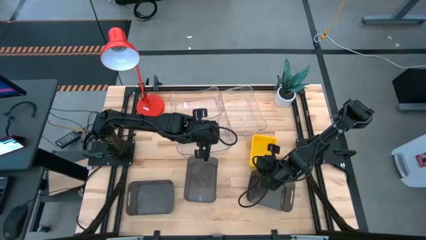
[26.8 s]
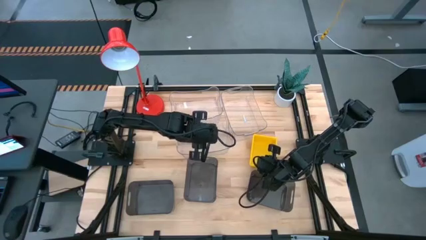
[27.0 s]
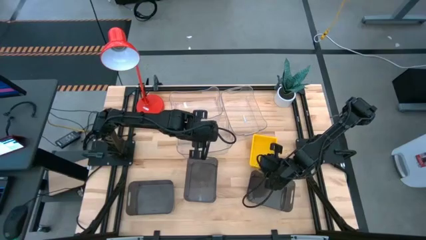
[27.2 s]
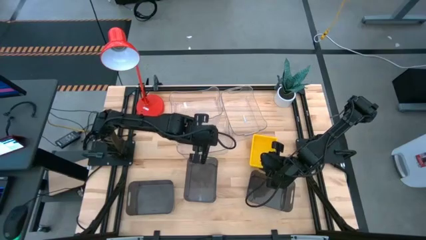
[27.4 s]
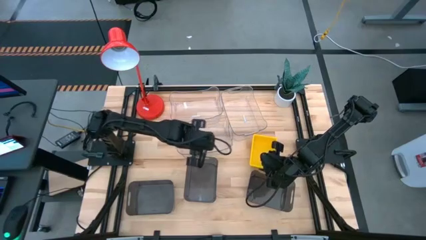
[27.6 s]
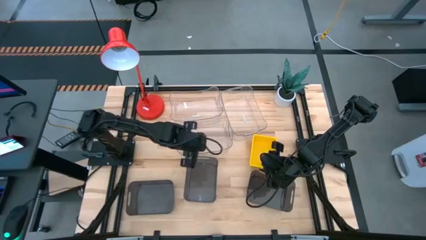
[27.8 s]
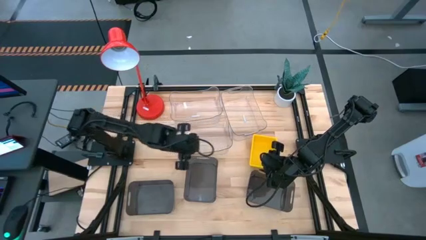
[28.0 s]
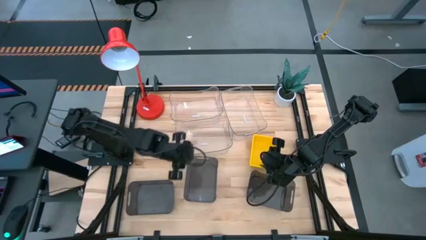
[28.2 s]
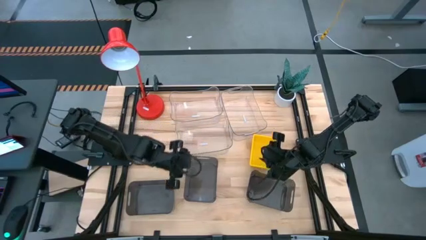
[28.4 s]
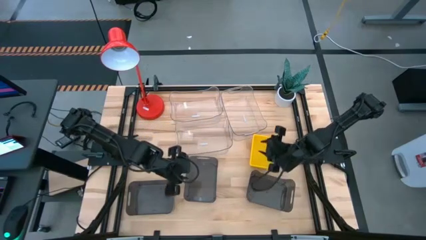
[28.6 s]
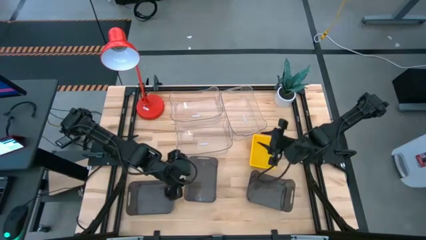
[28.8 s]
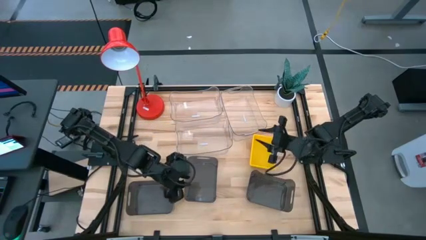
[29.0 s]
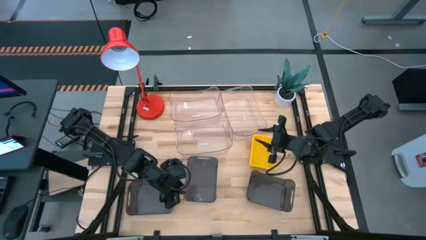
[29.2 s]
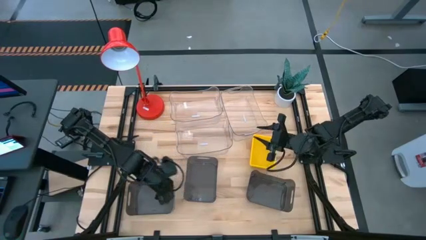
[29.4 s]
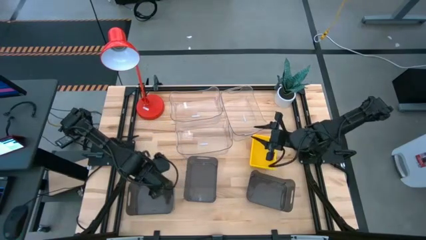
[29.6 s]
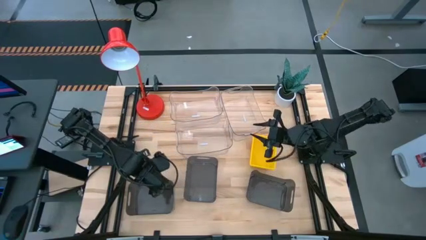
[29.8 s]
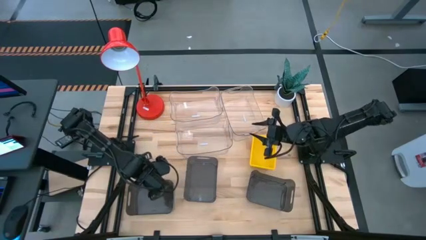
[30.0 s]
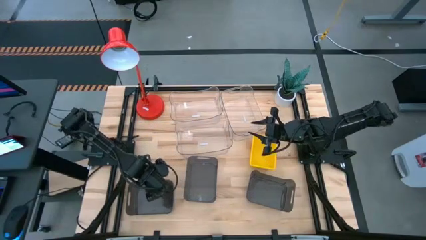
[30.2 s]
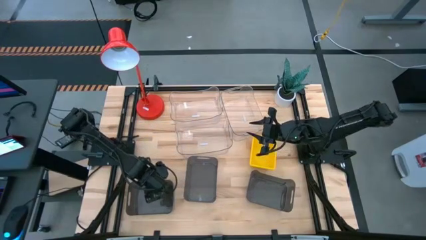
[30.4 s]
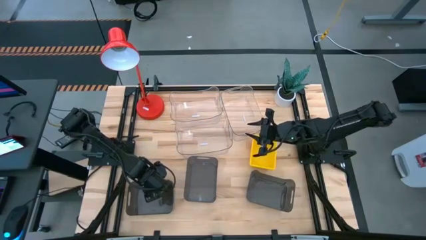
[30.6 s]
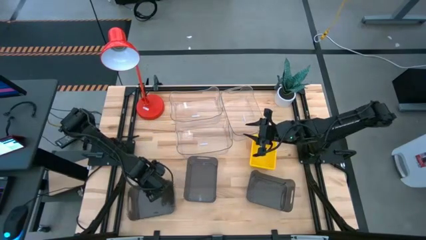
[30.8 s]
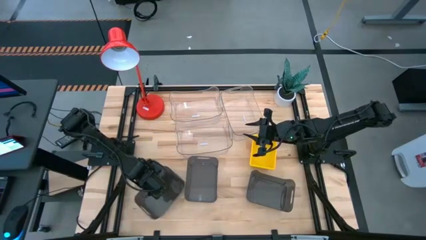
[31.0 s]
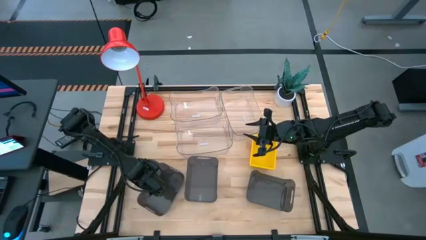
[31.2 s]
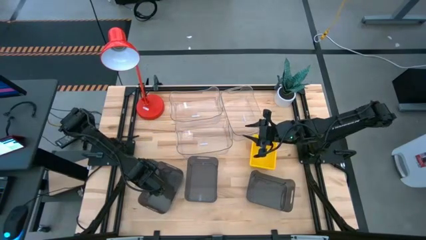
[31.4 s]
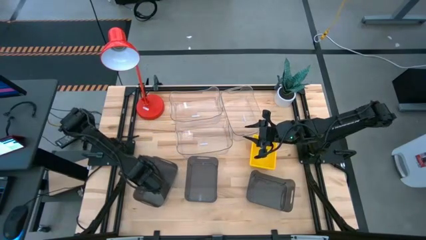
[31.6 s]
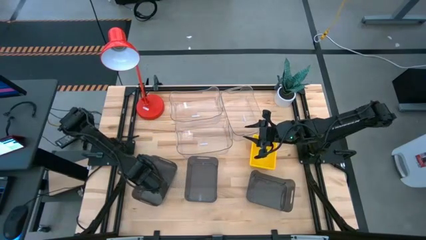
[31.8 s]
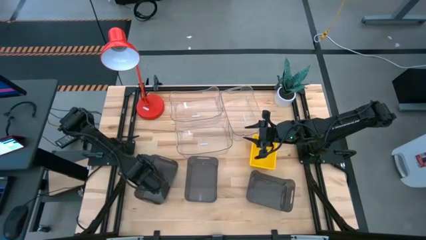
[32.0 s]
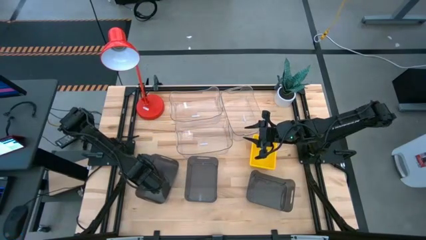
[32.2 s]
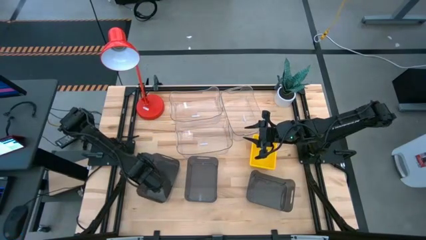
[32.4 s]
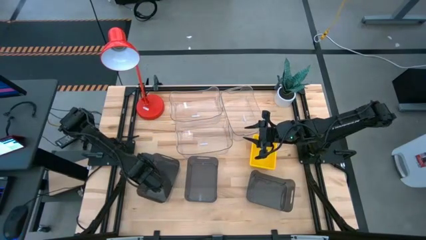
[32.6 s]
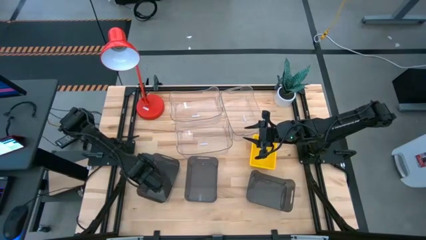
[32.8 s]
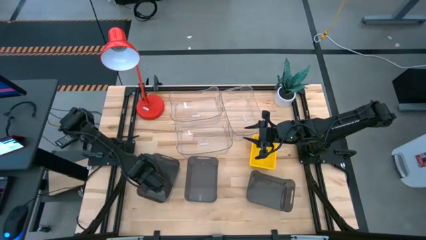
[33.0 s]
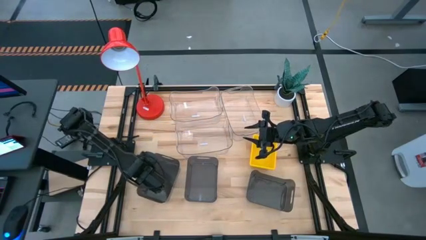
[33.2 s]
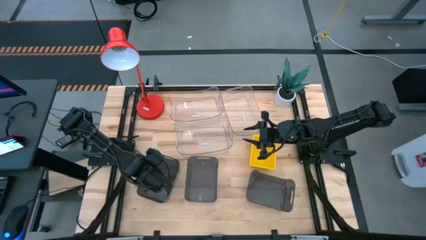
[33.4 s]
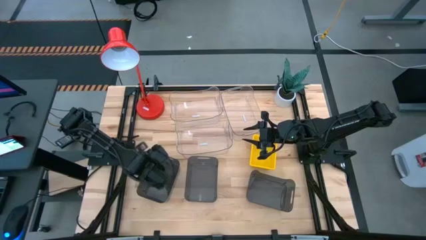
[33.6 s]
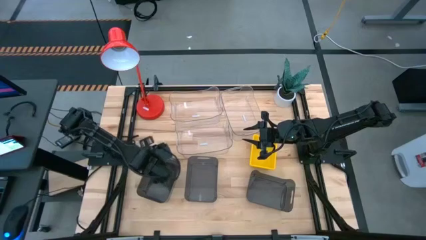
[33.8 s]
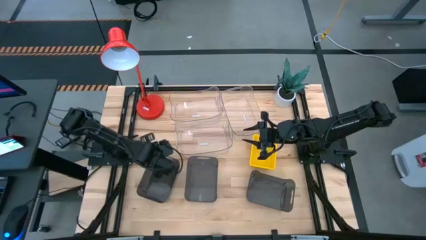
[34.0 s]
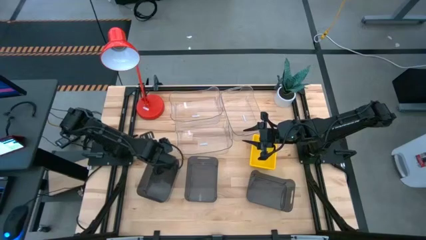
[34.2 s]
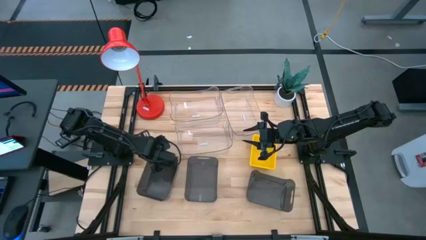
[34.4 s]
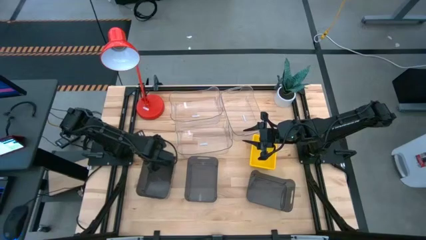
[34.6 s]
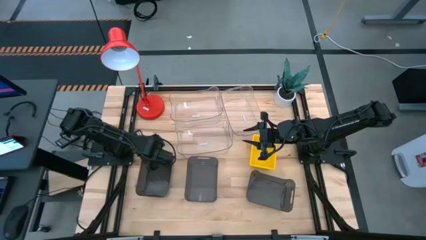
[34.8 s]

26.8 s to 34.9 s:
Adjust the left black bin

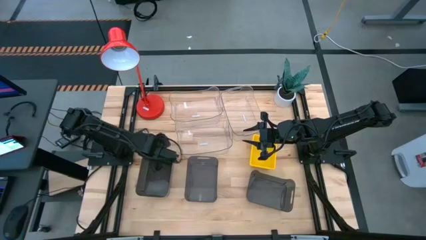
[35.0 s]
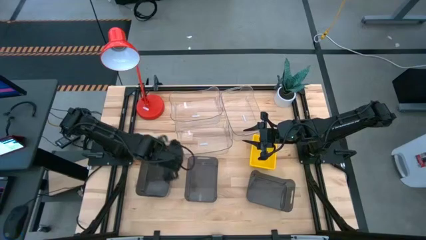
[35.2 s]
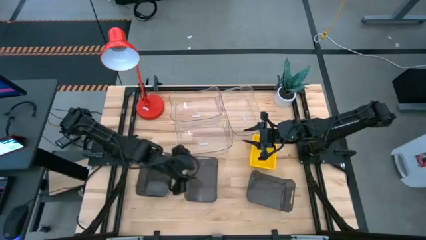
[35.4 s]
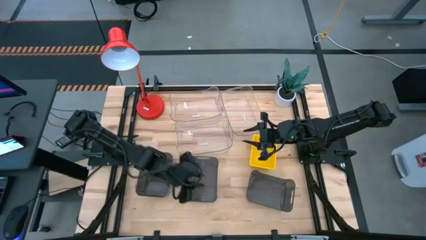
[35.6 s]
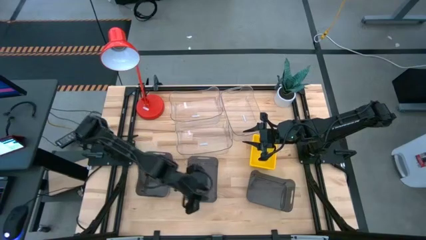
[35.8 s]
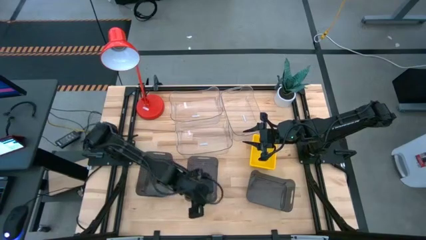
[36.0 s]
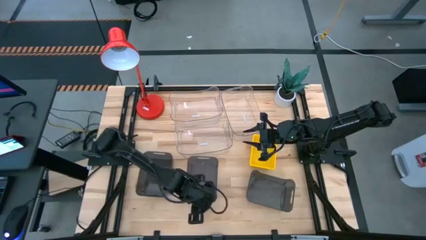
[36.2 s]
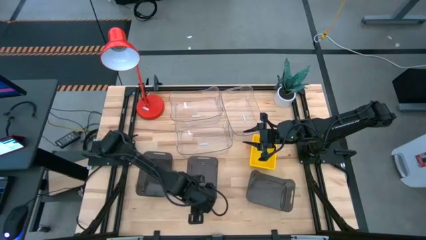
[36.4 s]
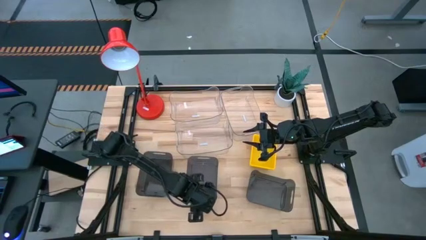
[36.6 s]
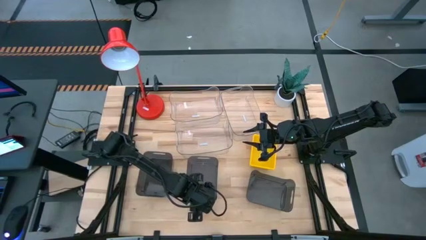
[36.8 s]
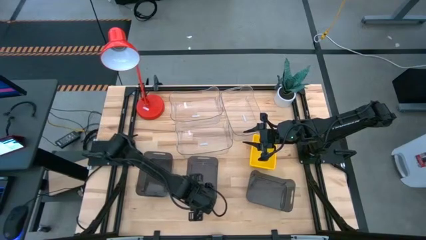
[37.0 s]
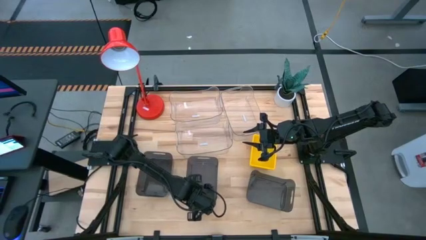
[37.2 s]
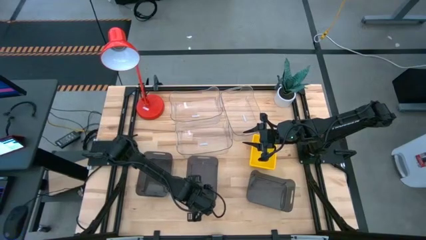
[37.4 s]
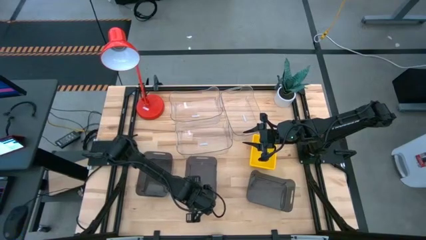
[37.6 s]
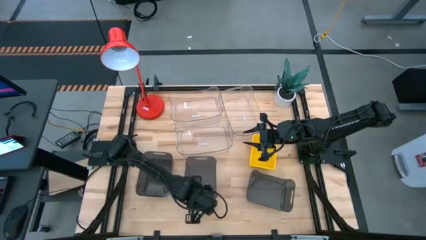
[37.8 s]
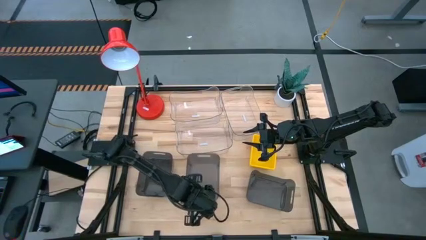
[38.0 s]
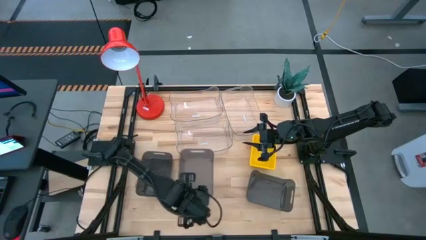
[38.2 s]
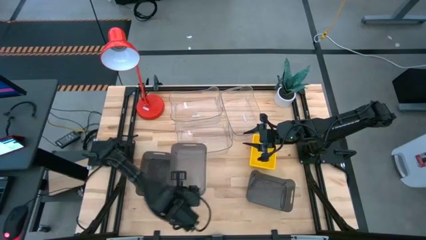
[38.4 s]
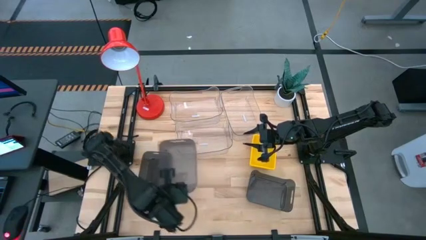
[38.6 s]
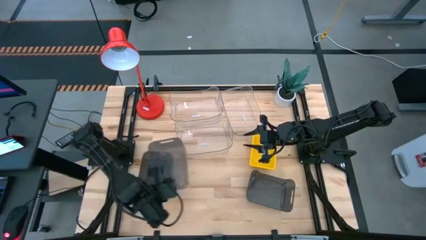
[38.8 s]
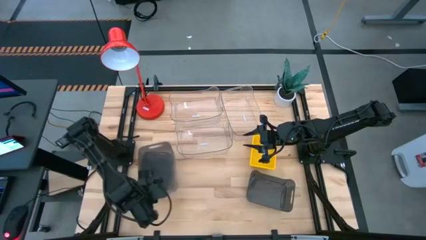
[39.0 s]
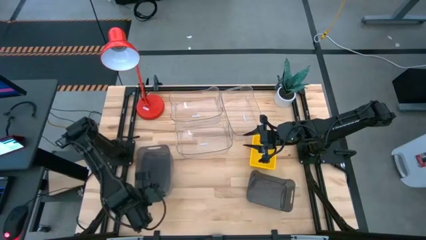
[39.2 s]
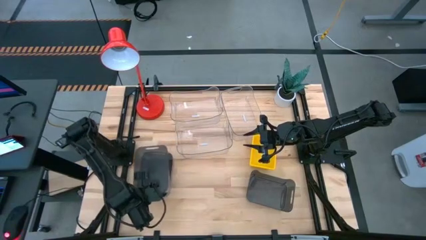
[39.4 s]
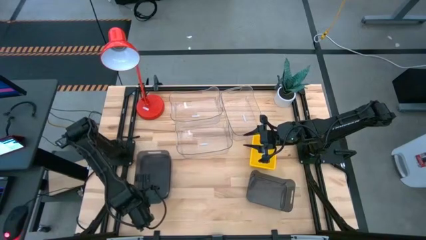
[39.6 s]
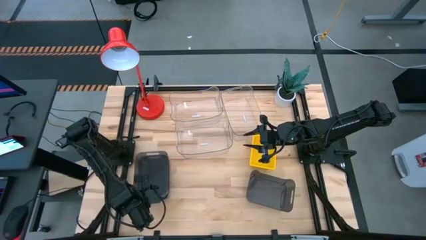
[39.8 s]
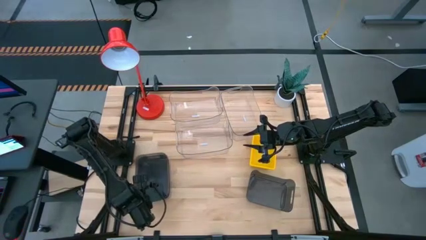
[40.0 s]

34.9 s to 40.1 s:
Stack the middle black bin on top of the left black bin

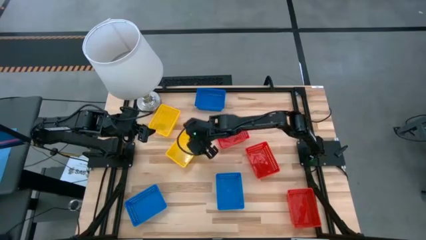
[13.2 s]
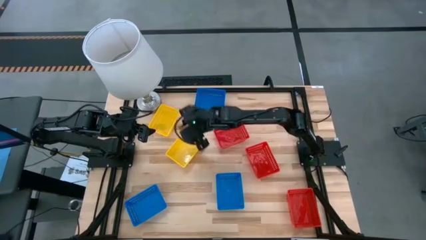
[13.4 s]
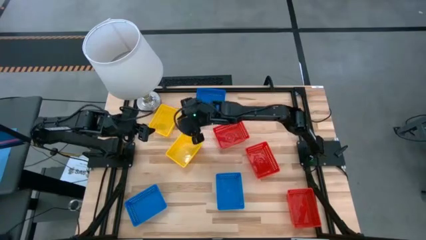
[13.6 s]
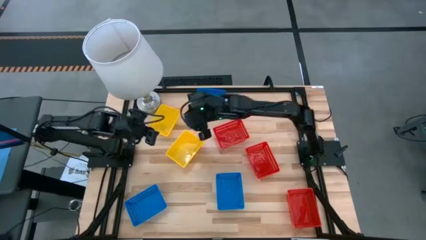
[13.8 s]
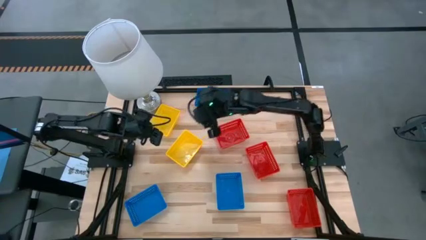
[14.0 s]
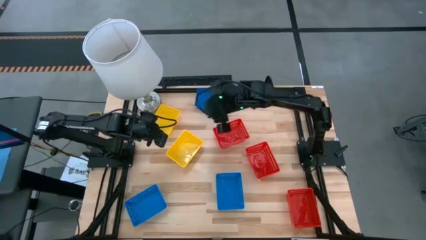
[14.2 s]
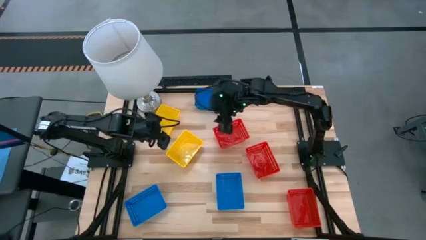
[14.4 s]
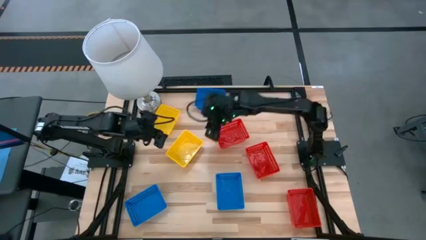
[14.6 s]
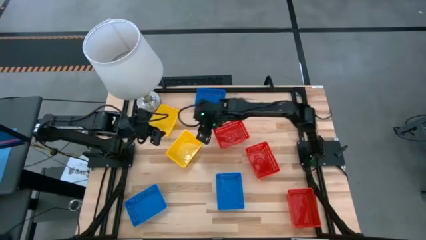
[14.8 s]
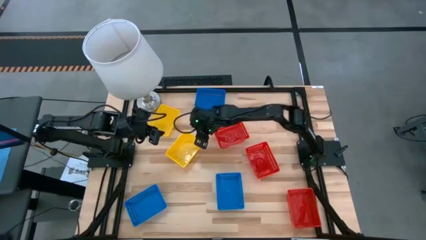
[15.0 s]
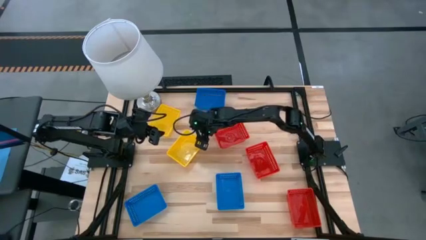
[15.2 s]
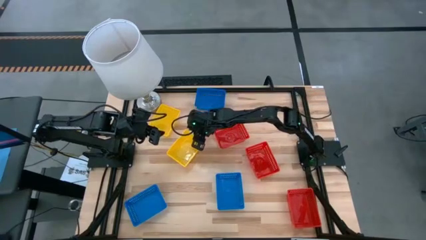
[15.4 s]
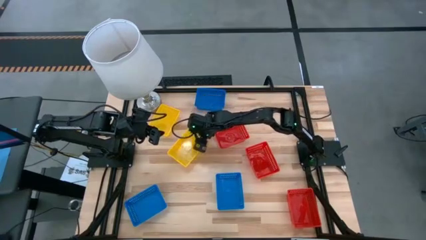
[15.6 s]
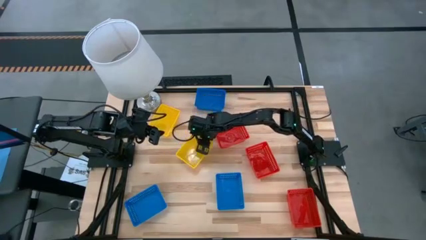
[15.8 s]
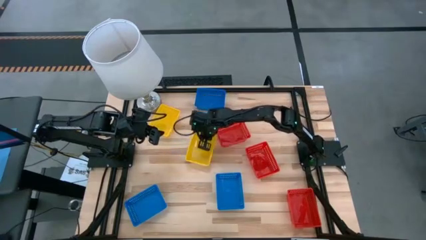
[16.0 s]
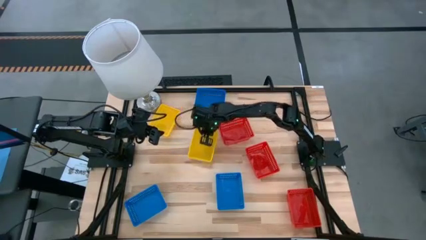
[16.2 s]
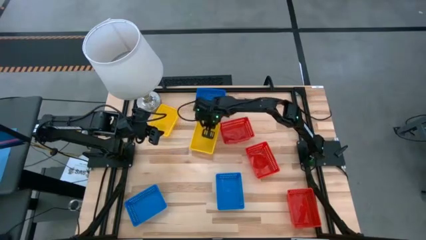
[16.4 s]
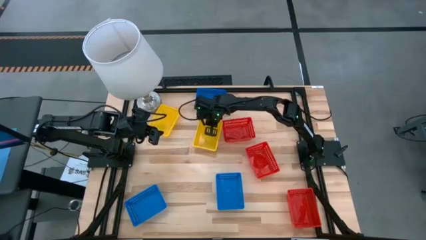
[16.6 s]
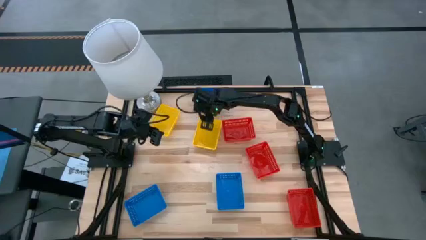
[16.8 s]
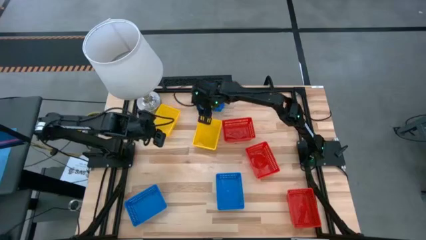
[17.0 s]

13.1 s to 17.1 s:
Move the bottom yellow baskets to the top center of the table
